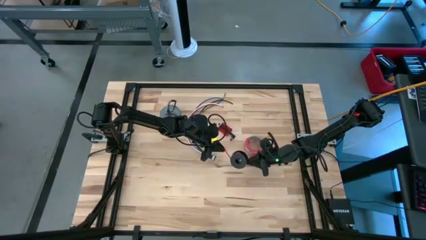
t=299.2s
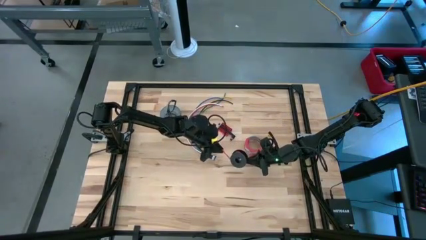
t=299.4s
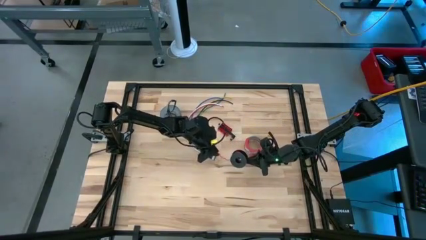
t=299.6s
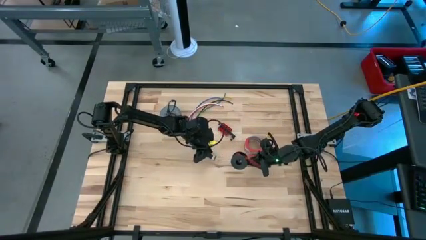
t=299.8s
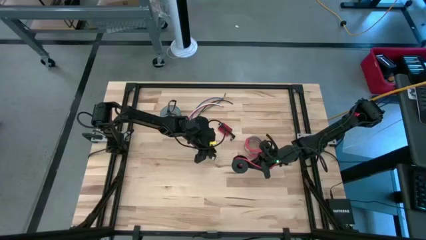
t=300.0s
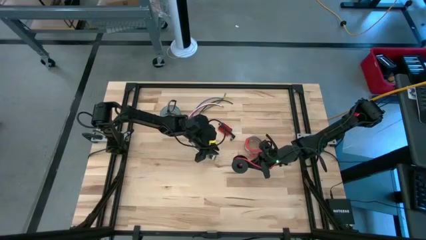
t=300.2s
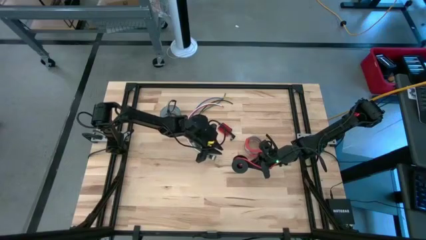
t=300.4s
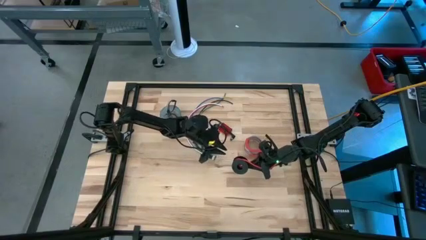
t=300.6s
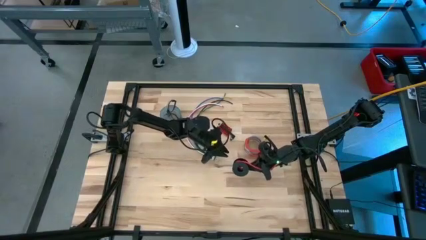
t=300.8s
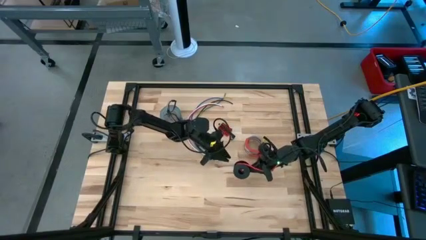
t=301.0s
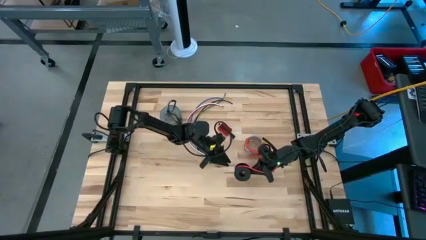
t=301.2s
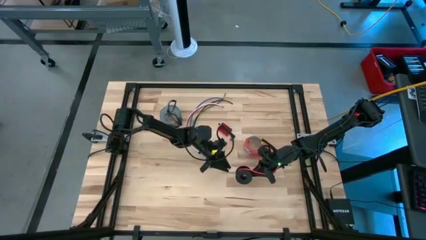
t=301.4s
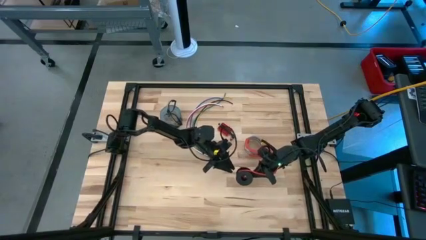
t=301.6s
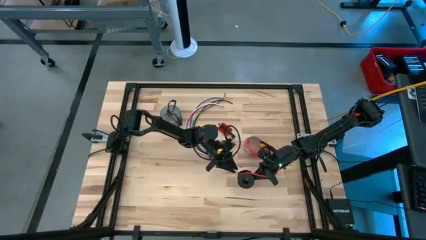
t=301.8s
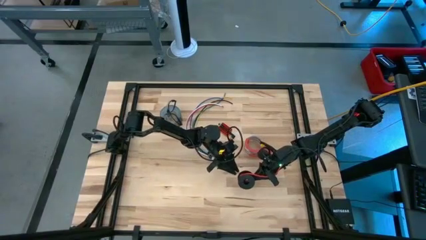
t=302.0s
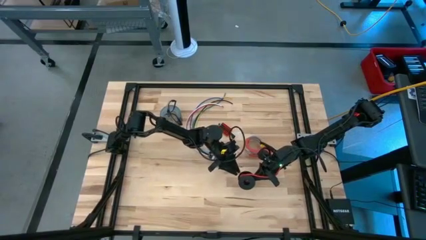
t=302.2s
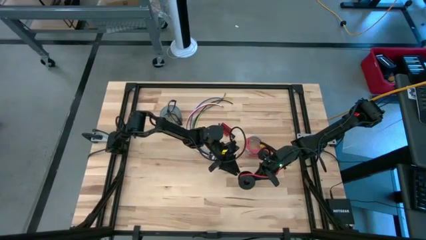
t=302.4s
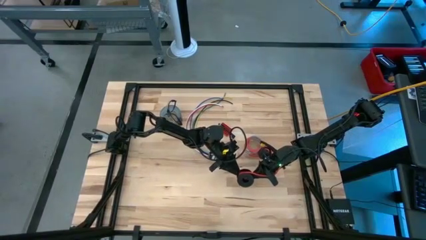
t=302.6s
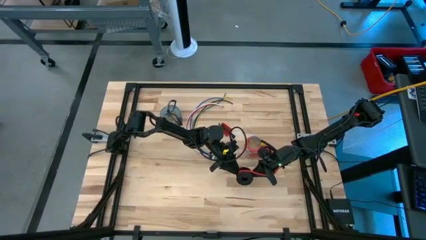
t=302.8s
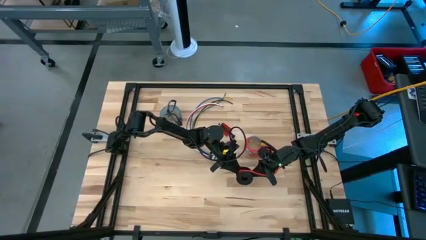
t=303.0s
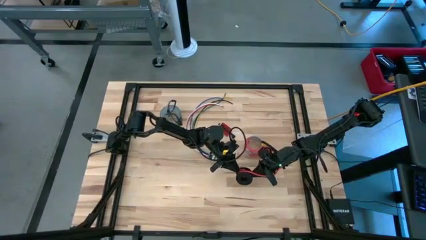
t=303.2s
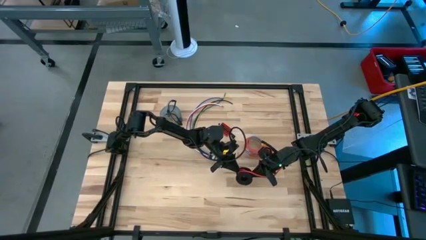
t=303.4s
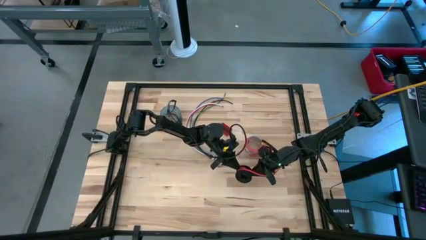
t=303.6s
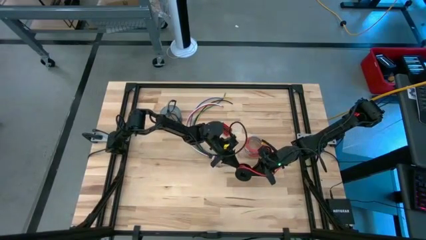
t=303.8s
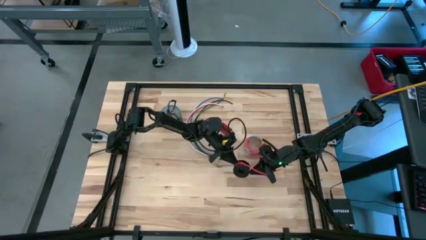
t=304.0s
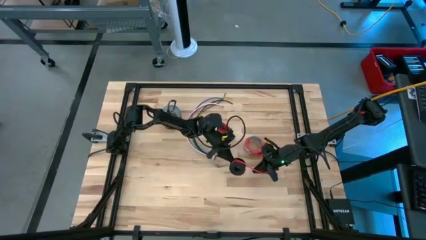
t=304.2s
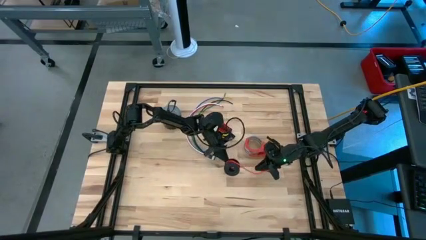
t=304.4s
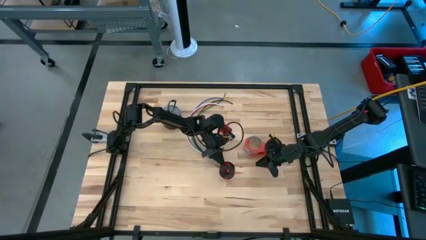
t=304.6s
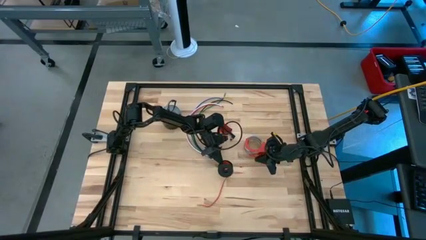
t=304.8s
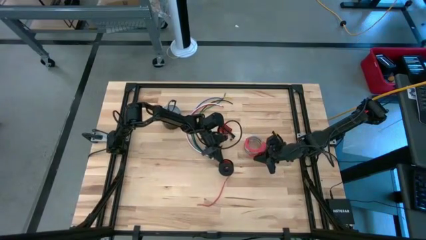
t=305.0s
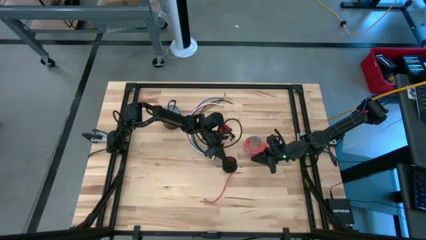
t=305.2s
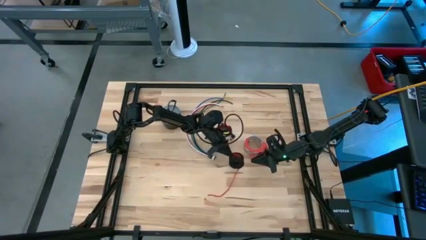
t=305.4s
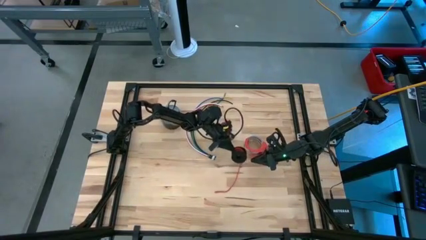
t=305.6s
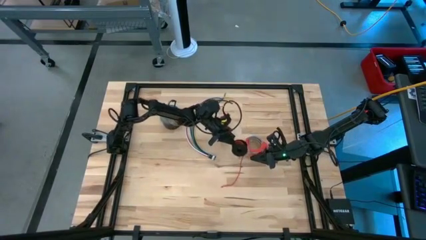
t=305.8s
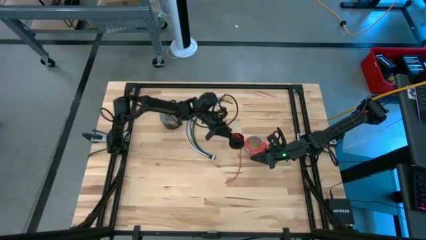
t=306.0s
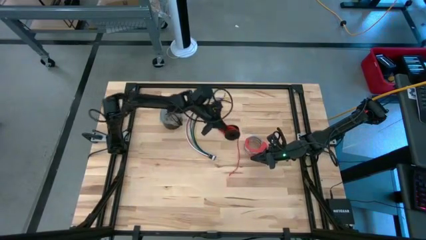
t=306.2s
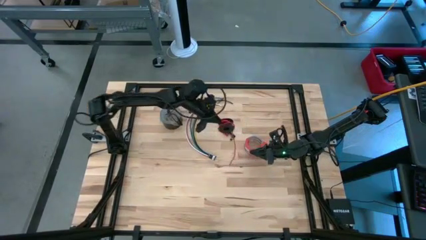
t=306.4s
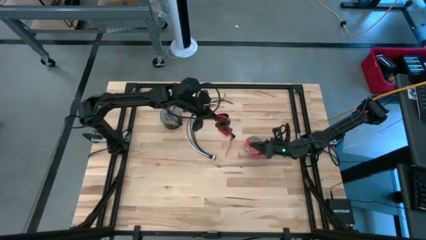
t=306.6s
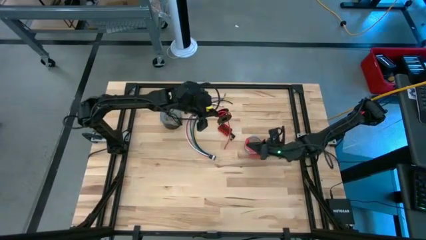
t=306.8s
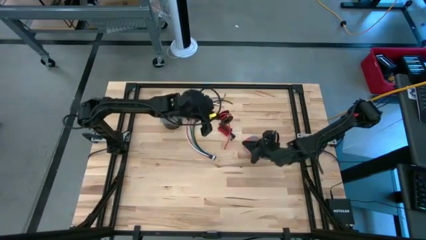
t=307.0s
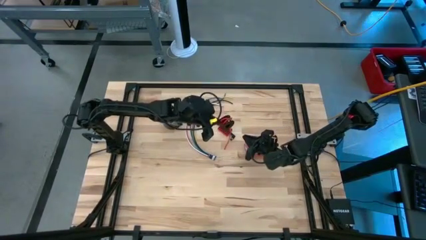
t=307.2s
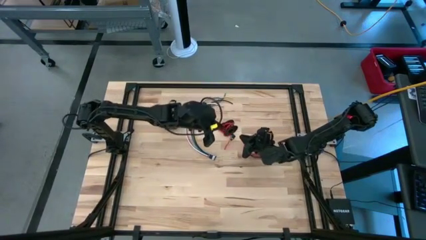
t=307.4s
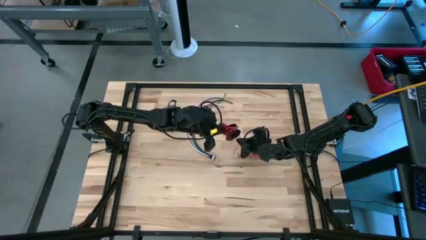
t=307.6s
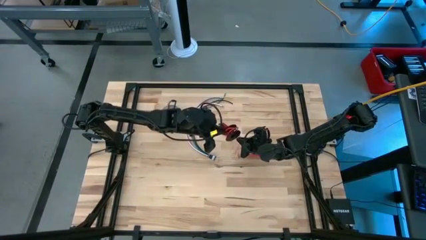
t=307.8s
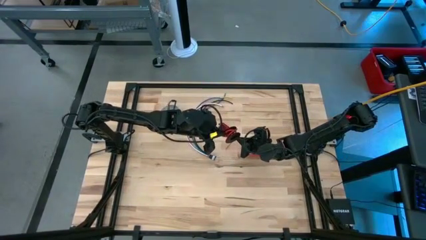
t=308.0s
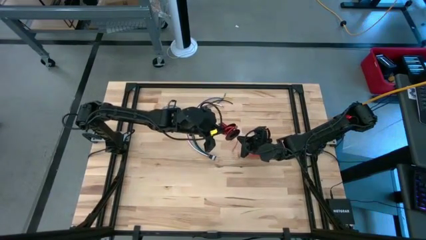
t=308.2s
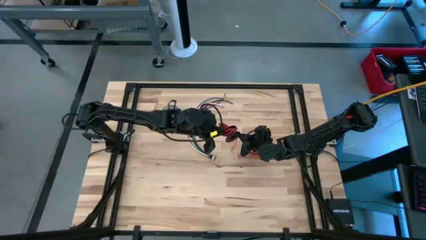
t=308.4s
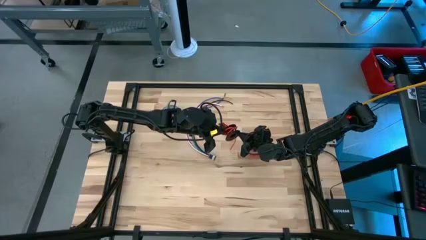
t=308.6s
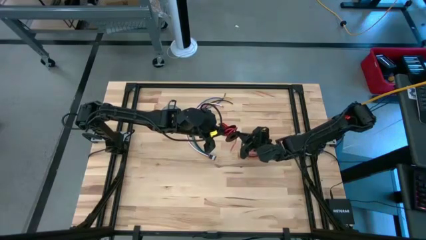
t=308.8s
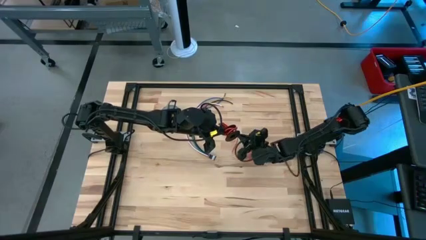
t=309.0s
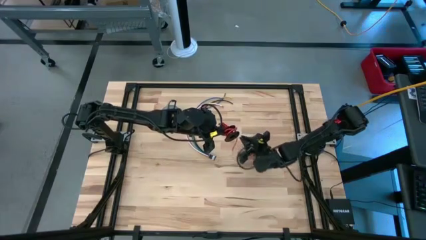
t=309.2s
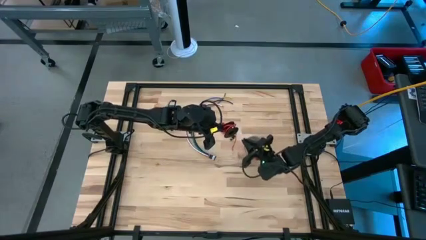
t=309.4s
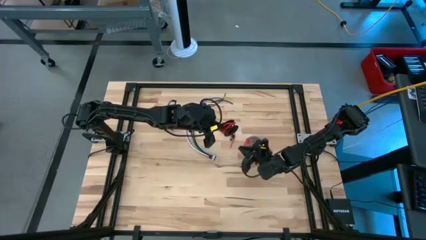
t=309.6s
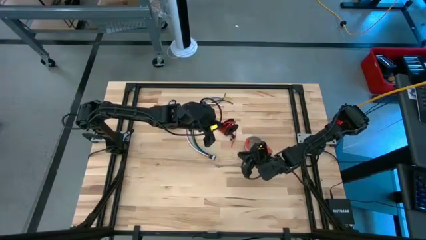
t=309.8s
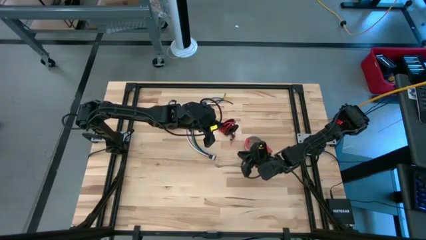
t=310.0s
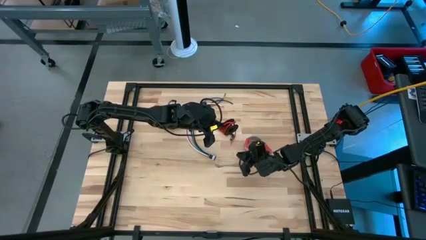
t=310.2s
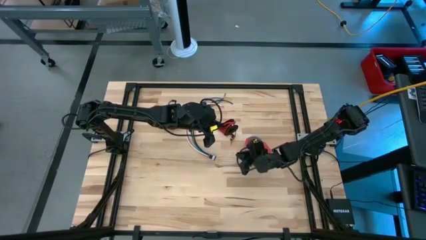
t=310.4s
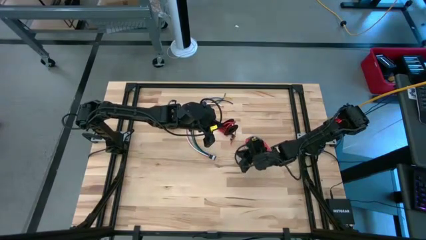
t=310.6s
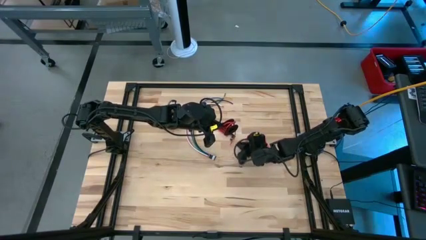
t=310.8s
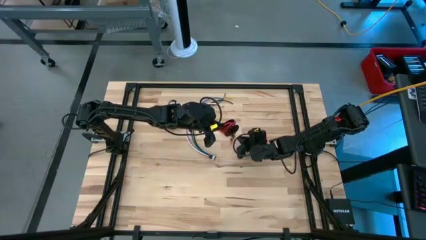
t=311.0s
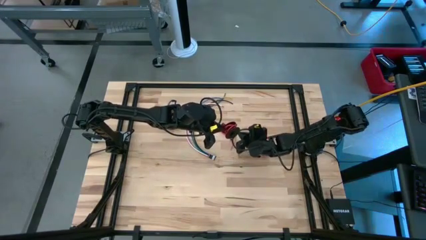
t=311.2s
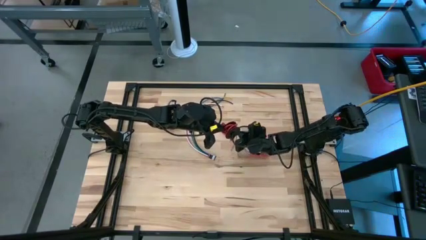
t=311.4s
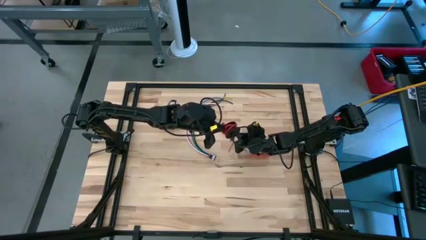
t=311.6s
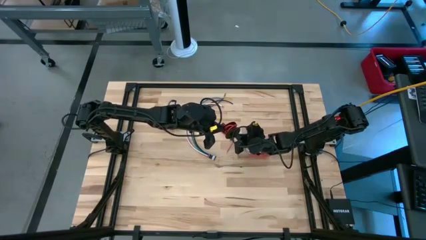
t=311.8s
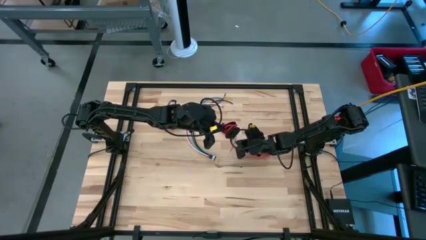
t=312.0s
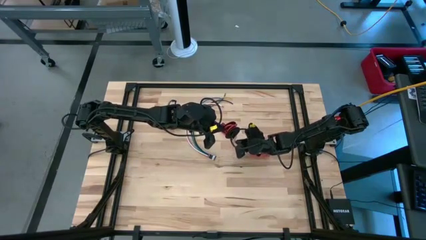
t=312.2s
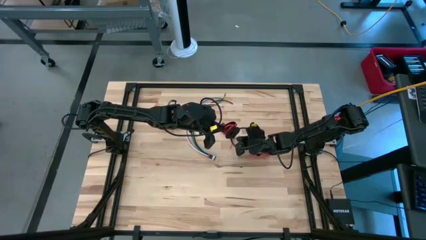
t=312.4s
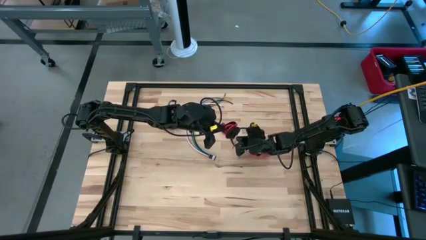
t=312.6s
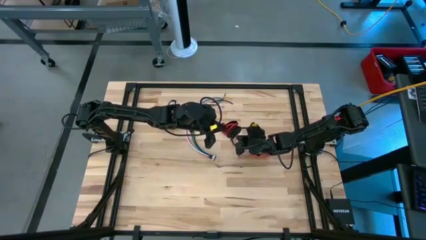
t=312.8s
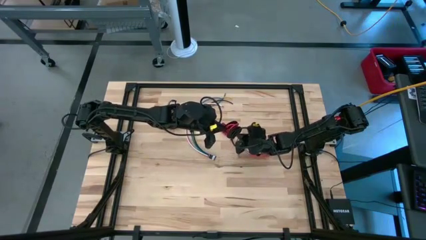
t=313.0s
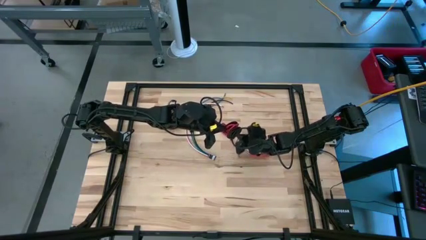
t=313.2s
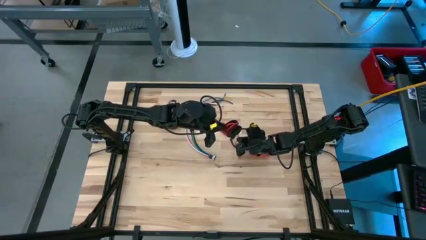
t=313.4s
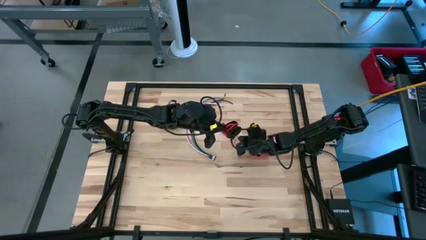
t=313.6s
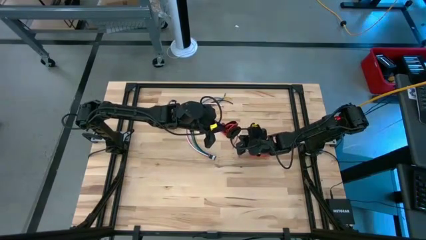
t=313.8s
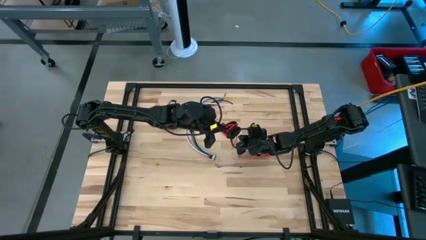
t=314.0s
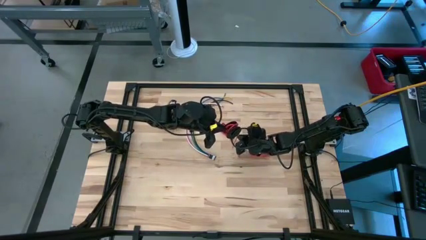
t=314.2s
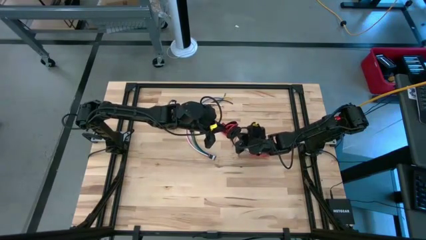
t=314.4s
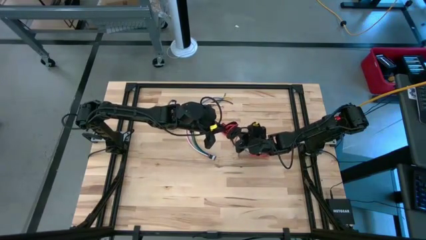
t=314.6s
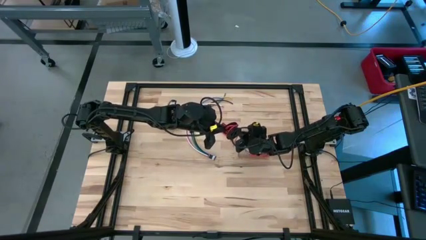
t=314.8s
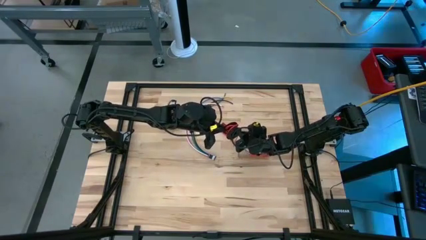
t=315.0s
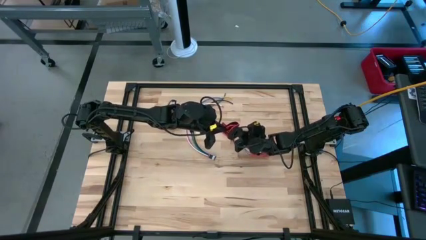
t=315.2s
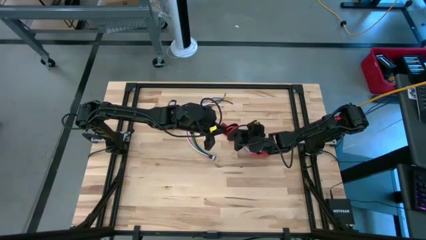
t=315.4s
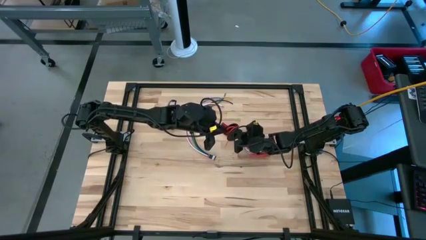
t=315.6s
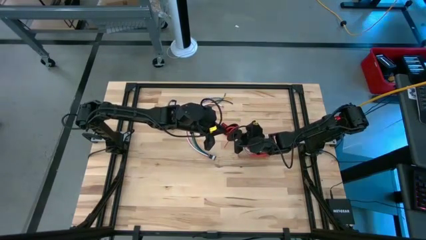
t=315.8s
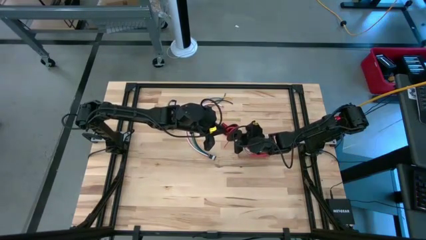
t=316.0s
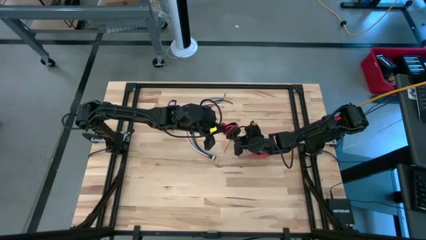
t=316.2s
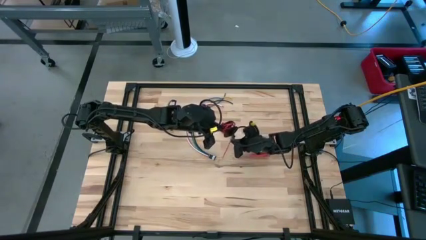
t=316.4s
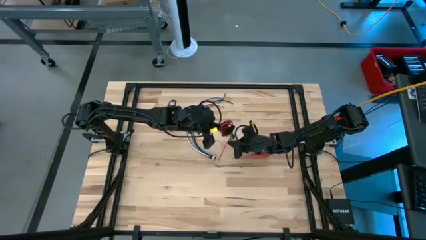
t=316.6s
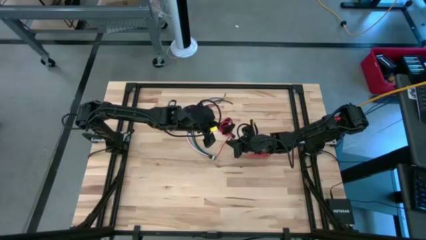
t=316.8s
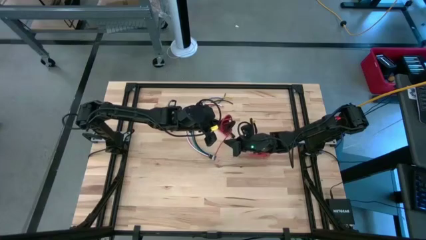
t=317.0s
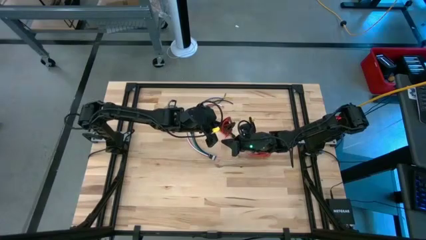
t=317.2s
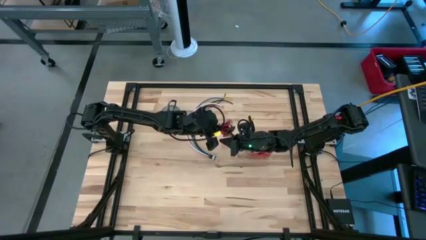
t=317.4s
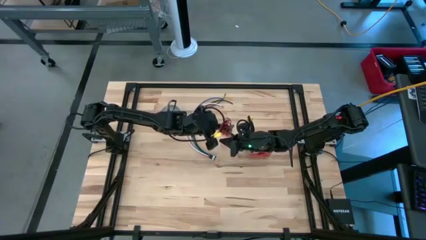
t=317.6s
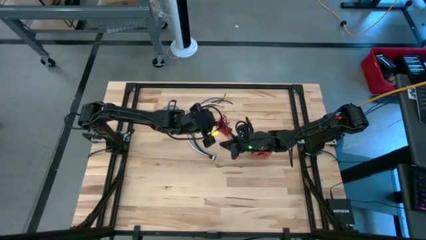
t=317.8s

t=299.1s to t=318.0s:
Task: Coil cords
Coil the red wire onto the spool
